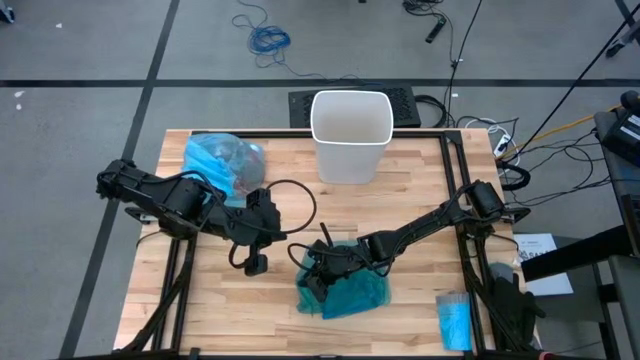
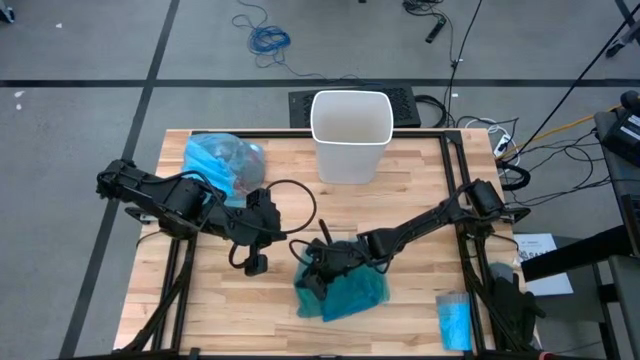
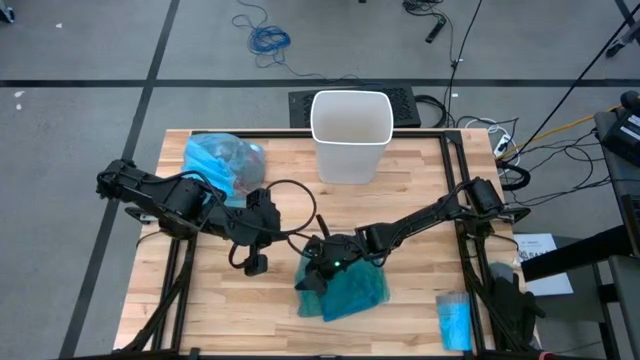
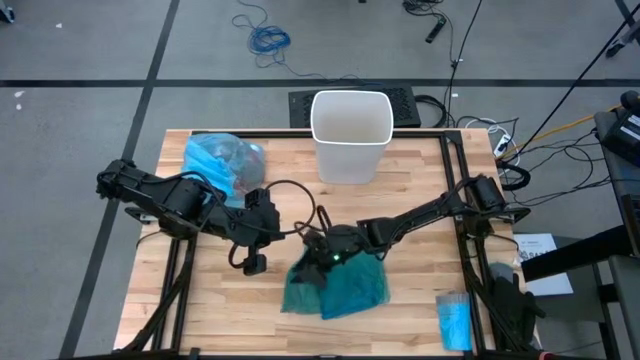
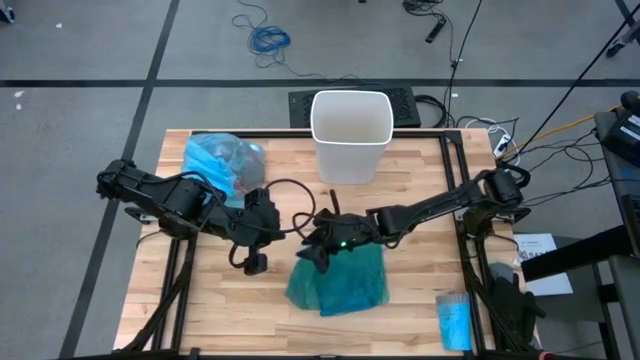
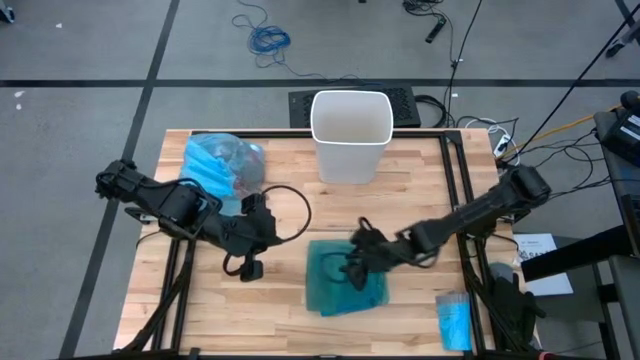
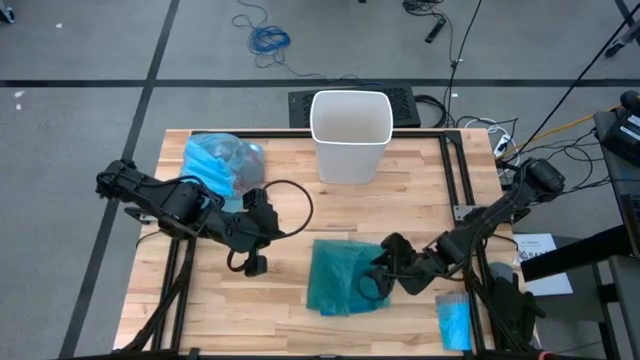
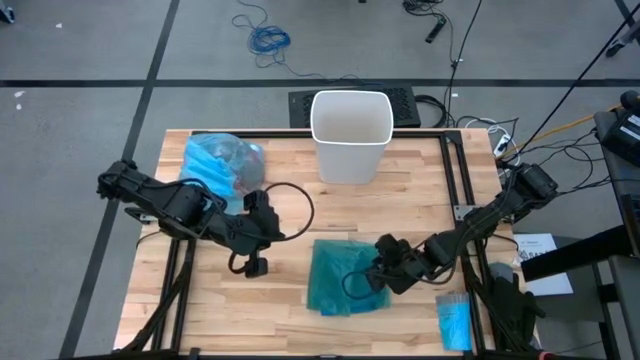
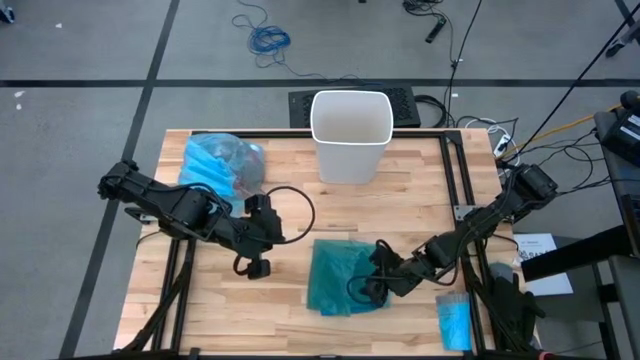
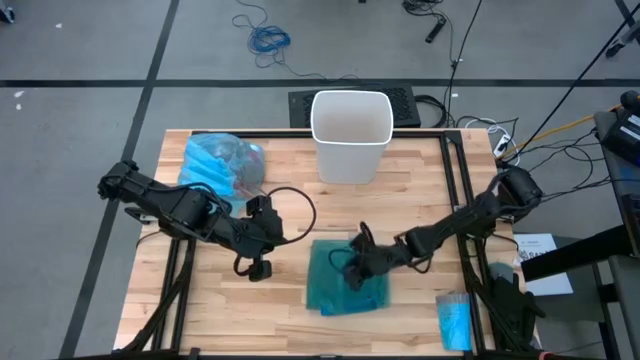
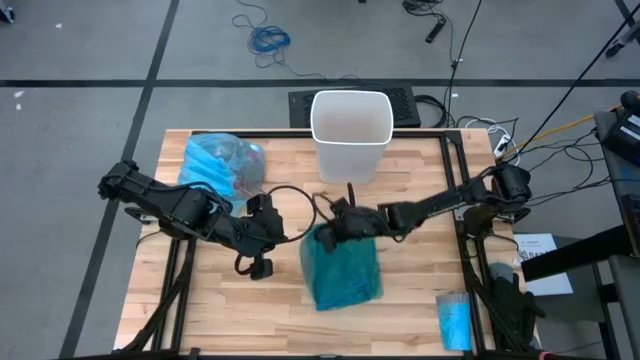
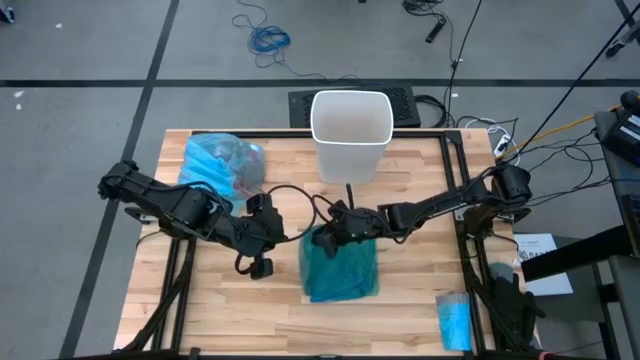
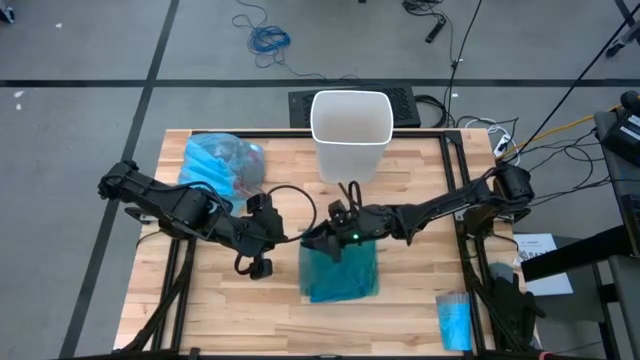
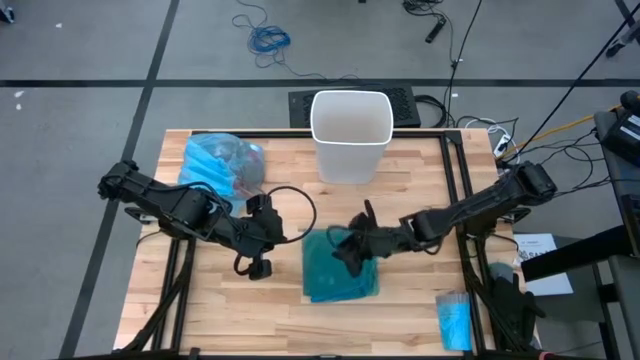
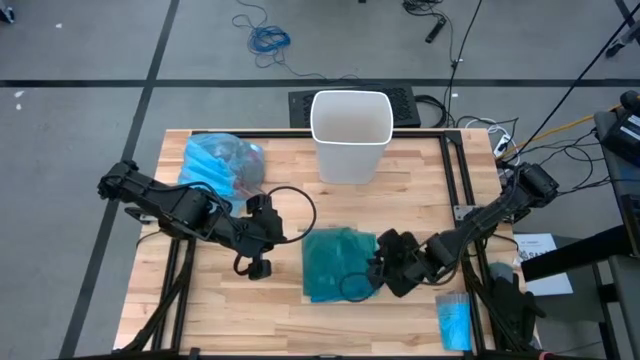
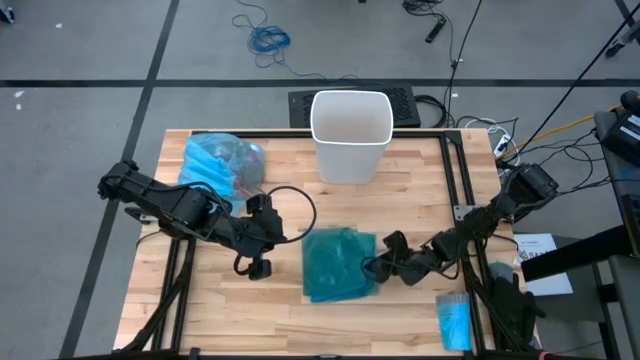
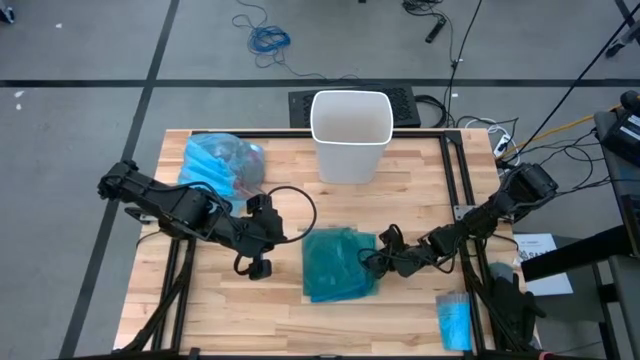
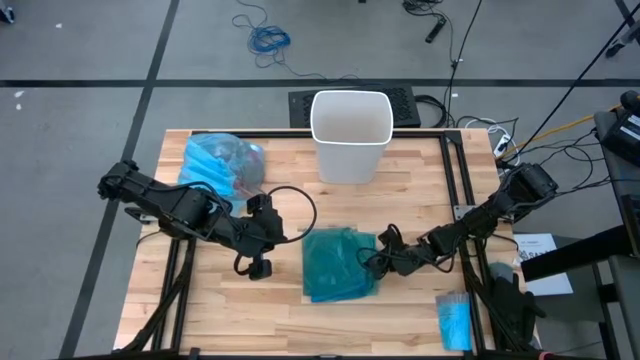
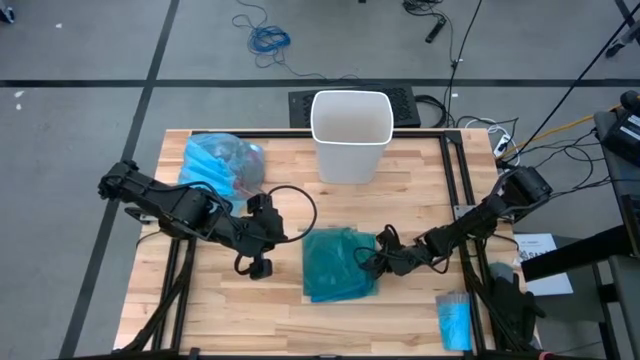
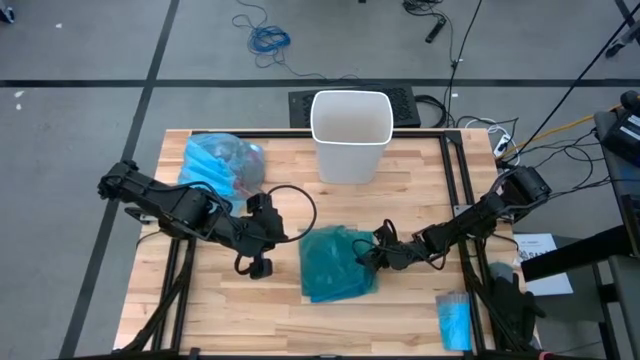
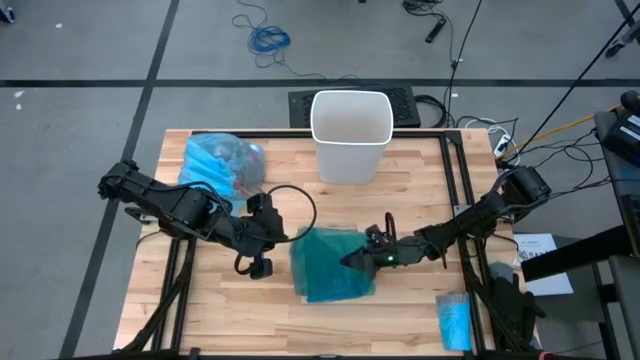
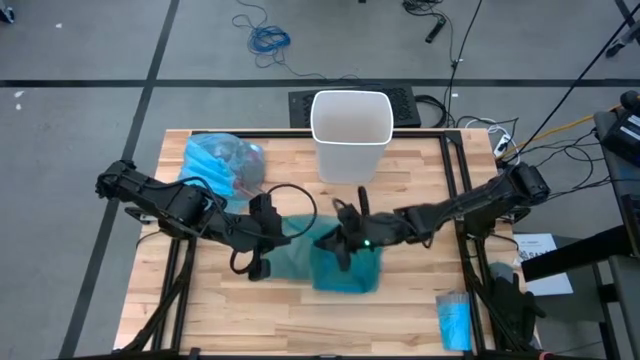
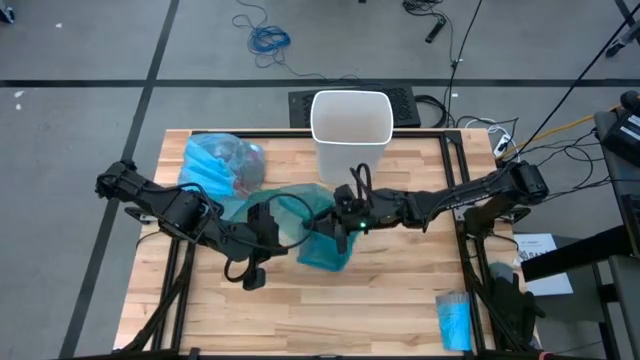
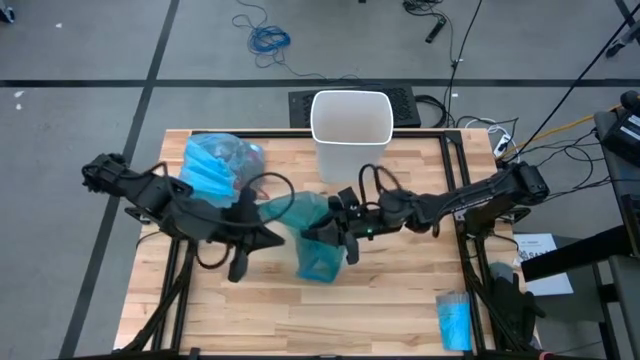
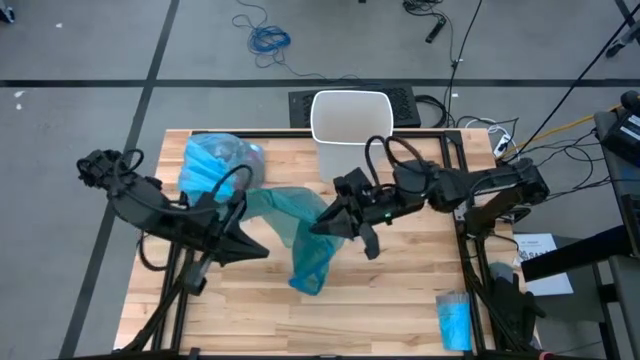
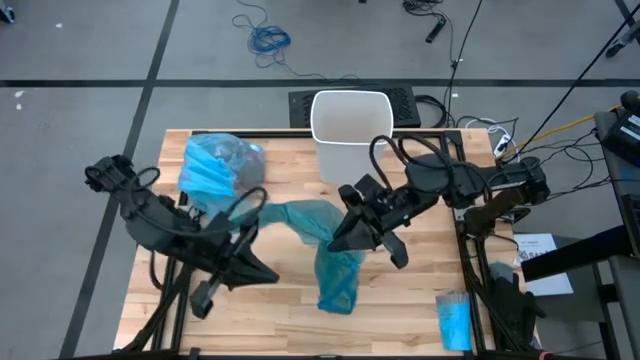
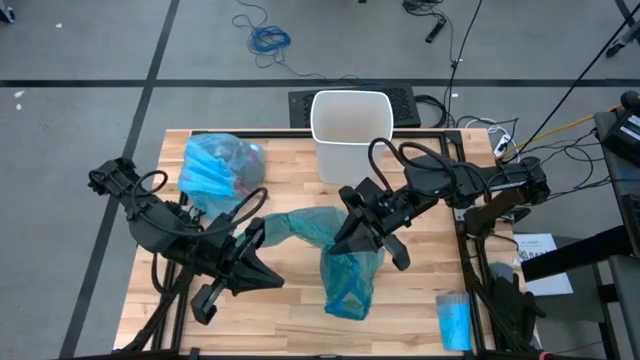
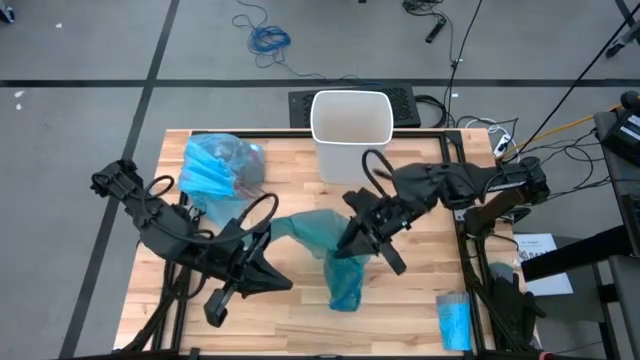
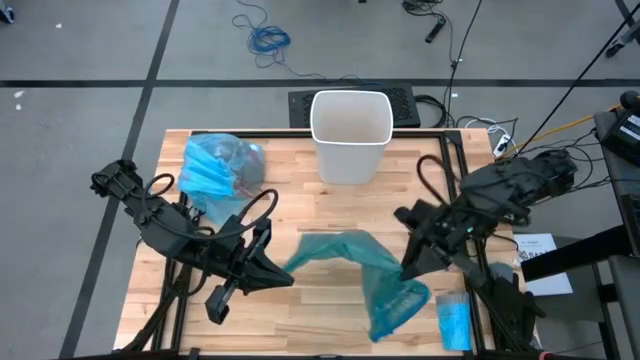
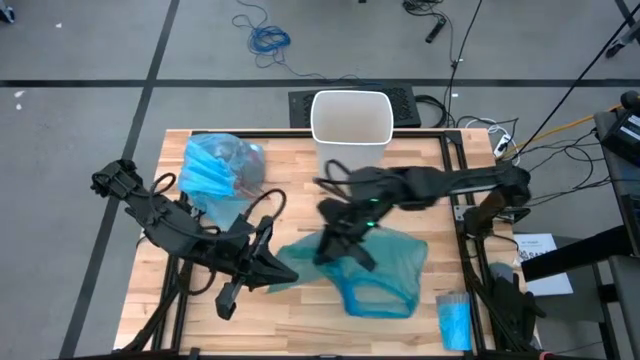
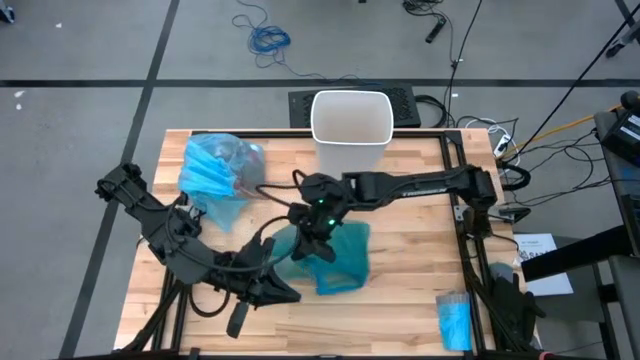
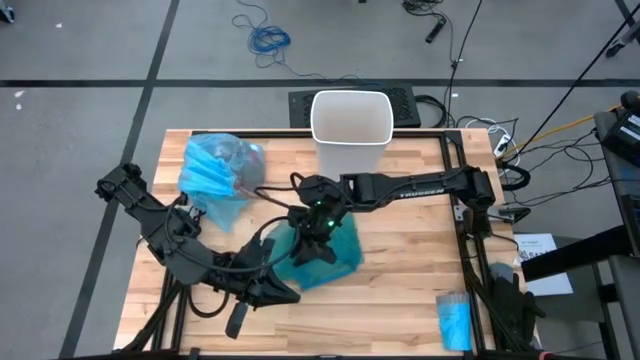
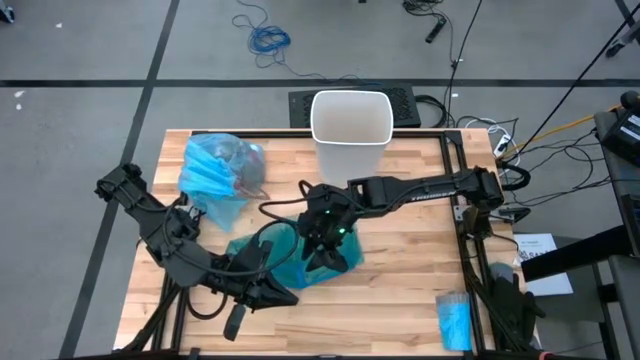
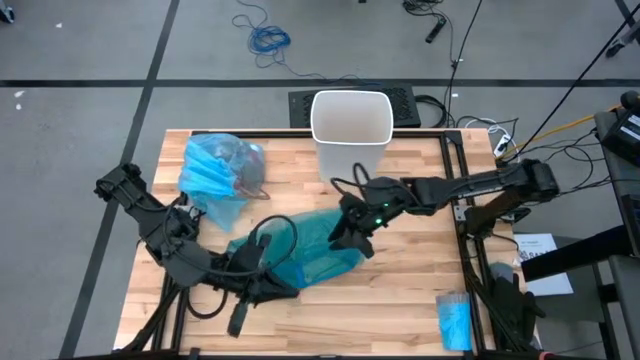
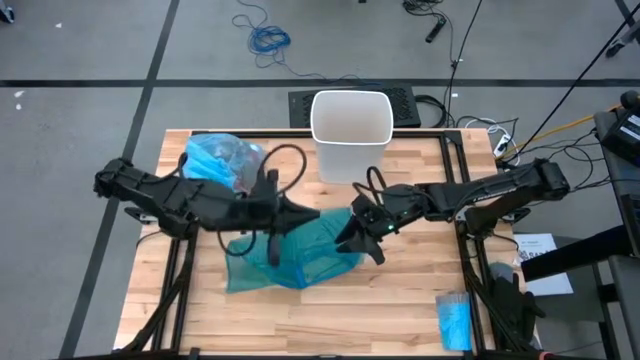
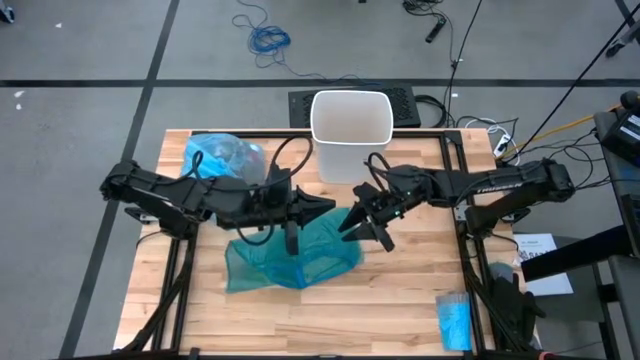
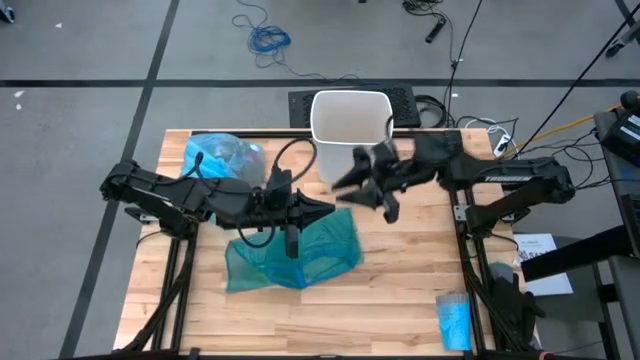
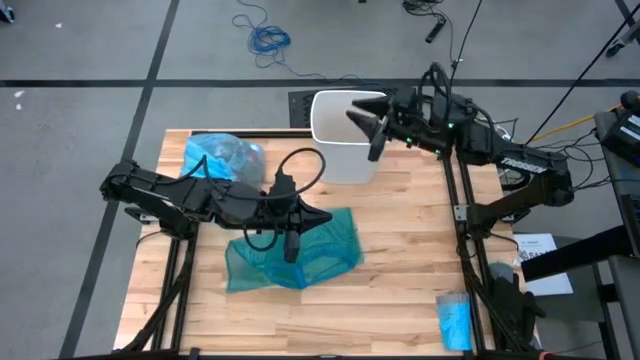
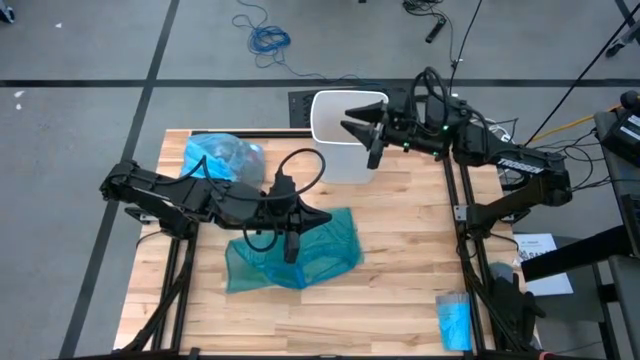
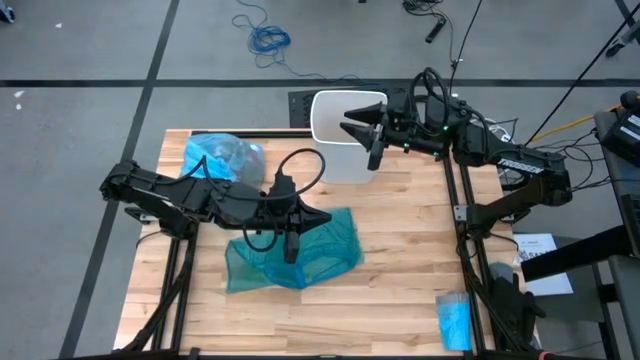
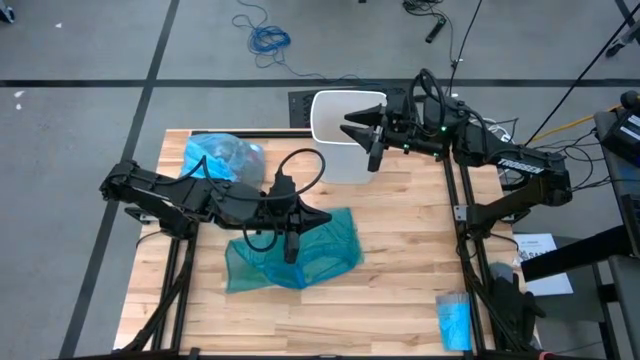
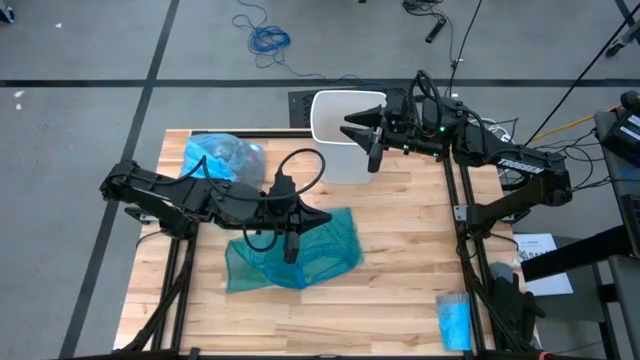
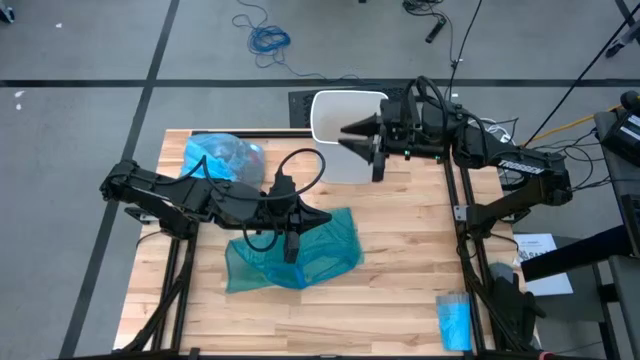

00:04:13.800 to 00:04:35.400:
Task: place trash/remove bag and relplace
Insert the new blue trash bag into the white trash bin
